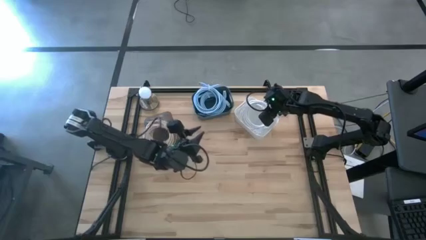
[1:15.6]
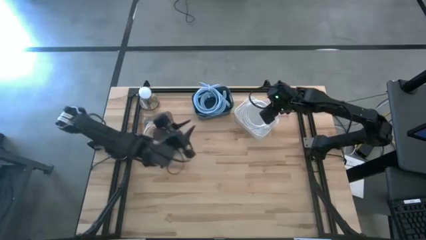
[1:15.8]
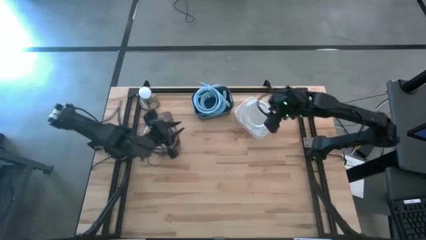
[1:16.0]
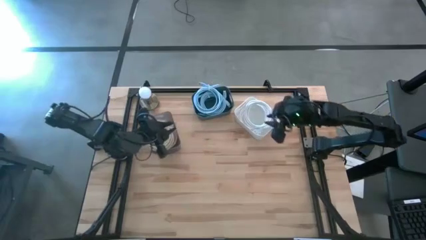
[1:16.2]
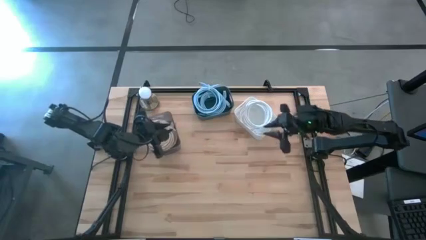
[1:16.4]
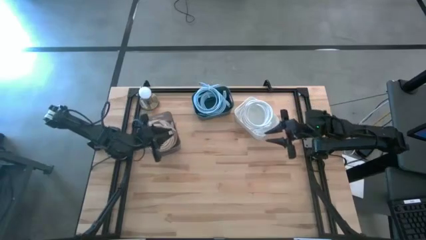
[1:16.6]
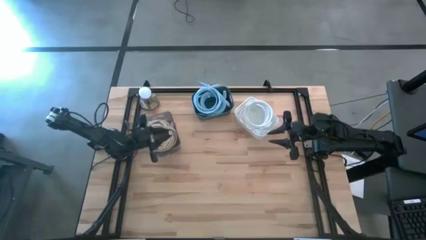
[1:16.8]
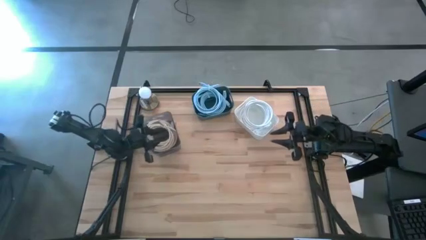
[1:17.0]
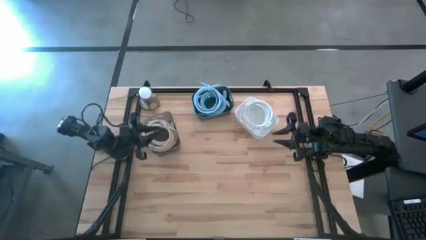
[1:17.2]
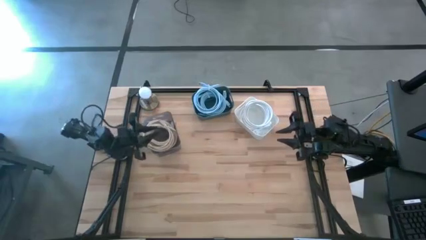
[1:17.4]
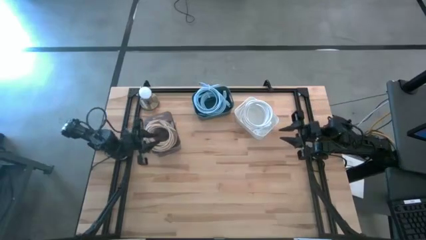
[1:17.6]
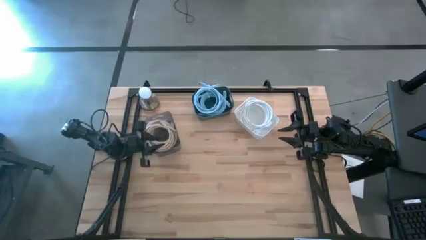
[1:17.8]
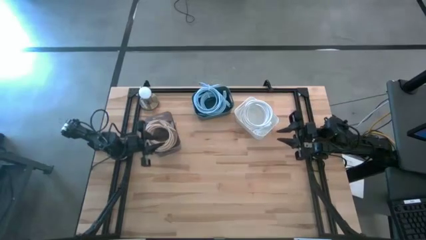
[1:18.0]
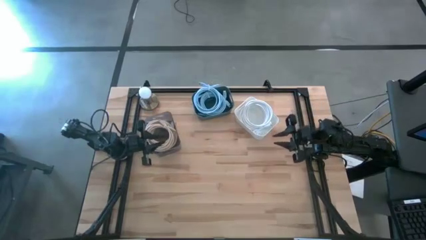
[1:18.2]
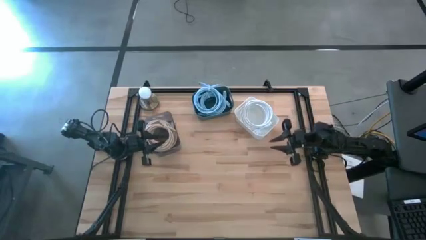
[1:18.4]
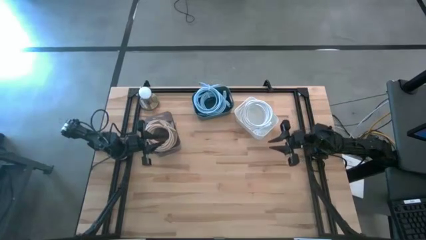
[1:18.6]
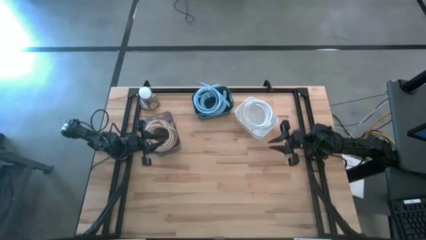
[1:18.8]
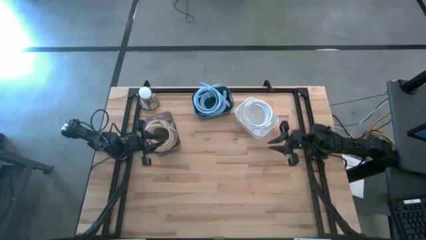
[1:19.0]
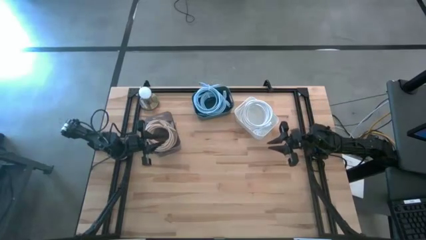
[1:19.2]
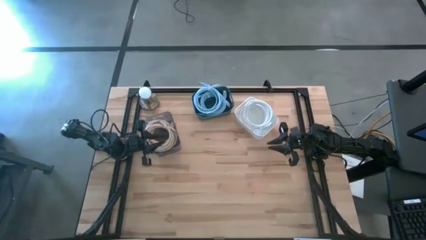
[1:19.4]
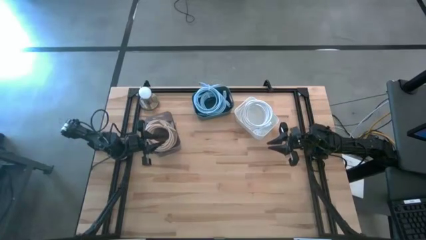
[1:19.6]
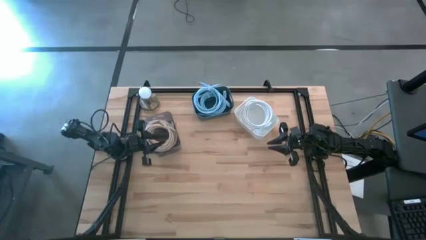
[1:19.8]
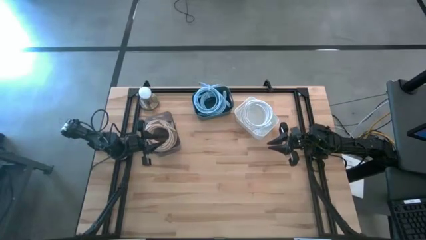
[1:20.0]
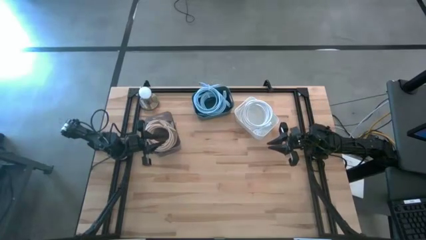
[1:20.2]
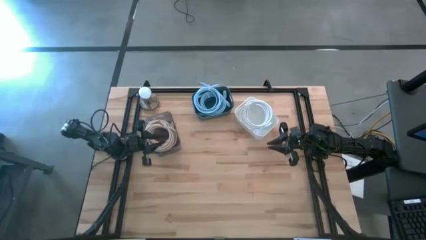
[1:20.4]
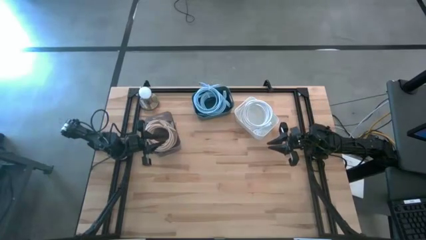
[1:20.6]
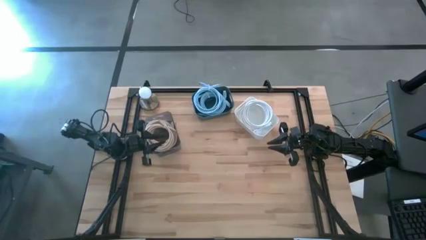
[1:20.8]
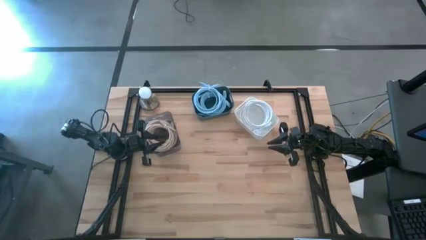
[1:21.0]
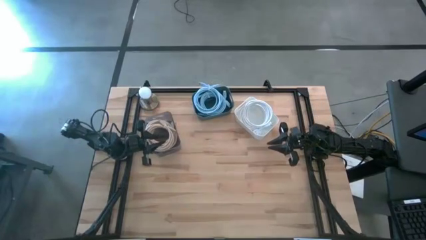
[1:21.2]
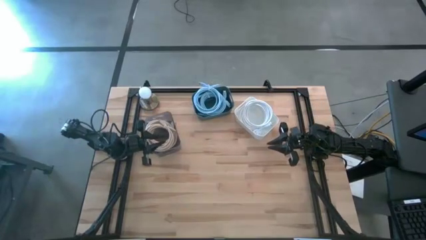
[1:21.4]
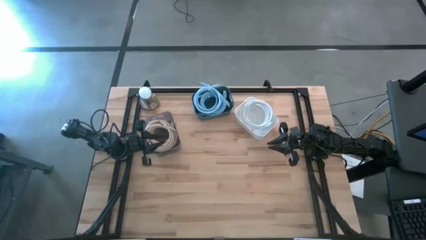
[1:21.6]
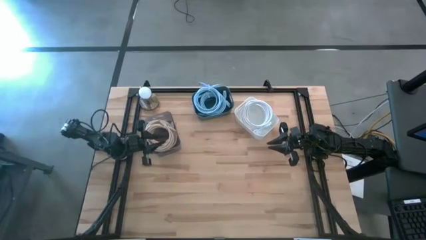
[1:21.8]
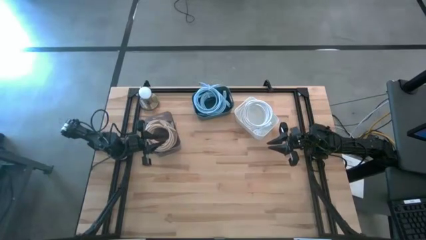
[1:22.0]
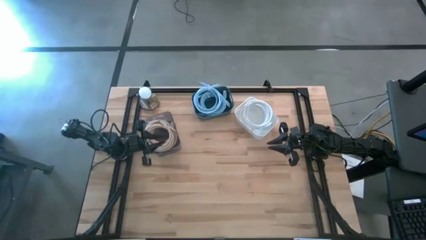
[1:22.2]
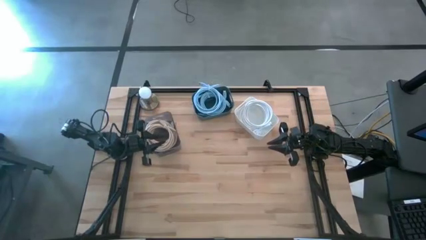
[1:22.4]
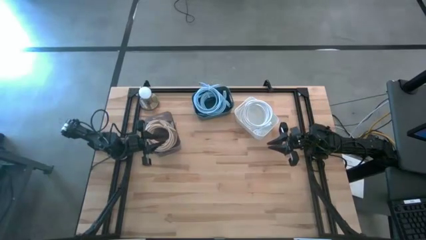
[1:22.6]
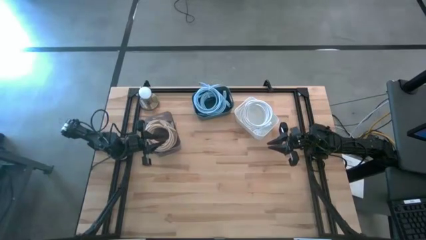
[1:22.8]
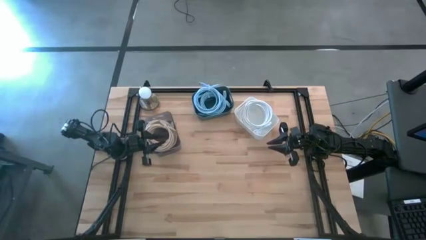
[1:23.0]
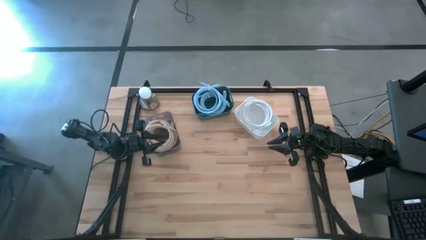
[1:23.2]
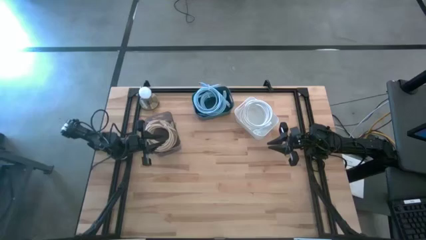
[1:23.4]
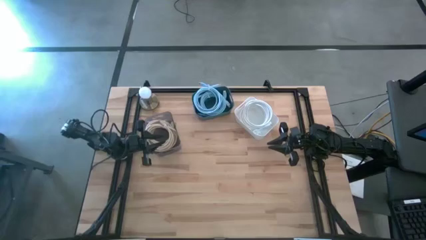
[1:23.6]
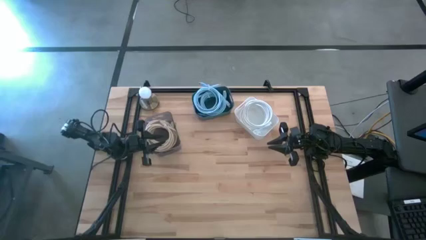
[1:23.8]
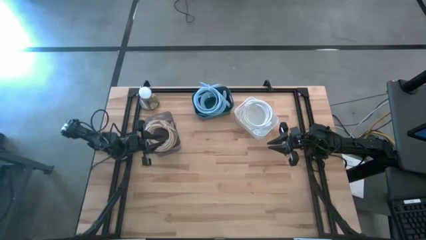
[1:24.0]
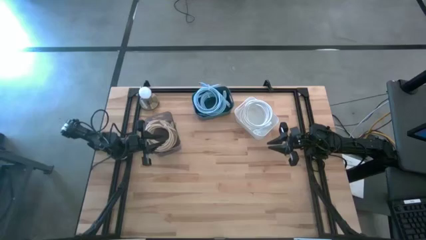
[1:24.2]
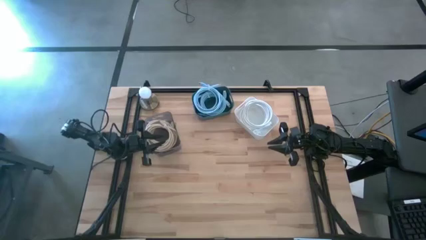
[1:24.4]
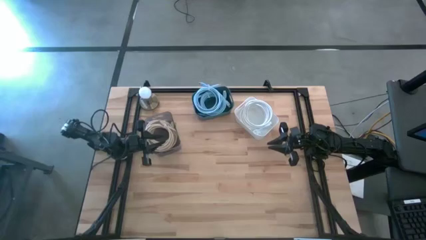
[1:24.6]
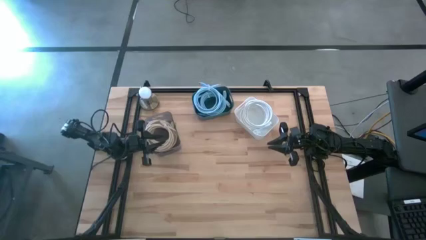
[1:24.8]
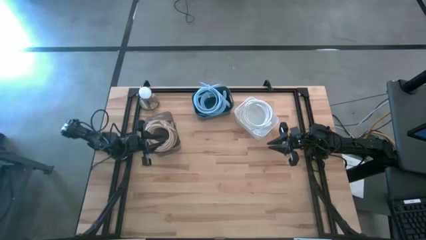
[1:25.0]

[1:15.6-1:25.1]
Task: Sort HDMI cables
Return to Home Position
